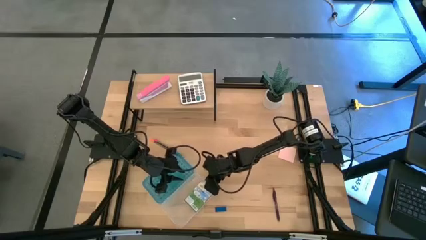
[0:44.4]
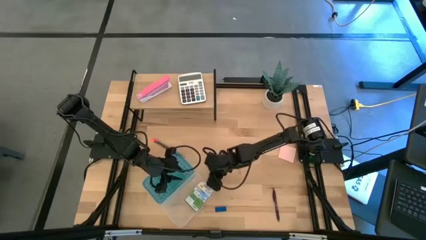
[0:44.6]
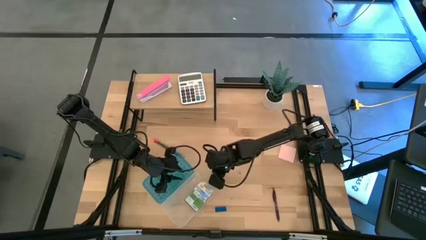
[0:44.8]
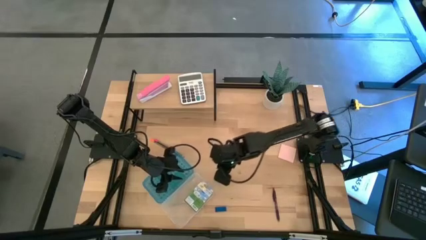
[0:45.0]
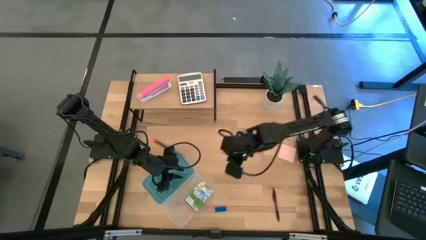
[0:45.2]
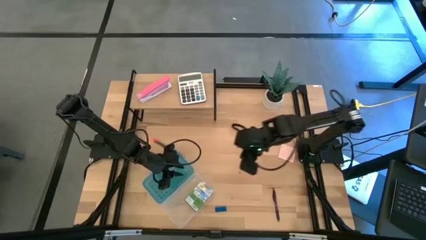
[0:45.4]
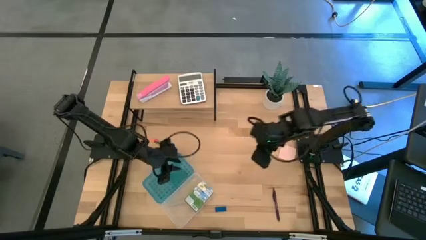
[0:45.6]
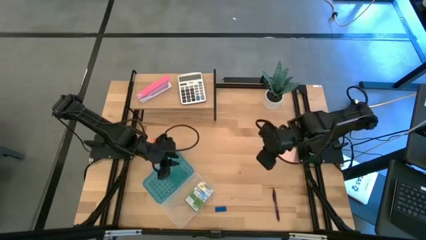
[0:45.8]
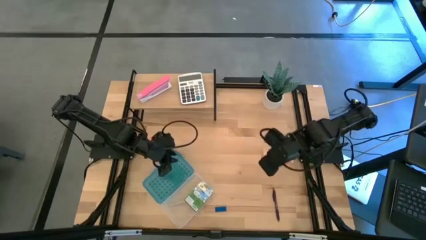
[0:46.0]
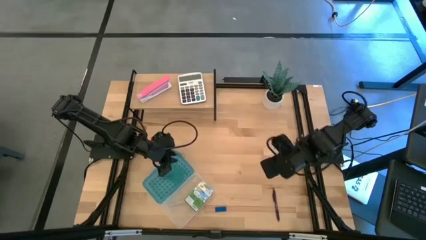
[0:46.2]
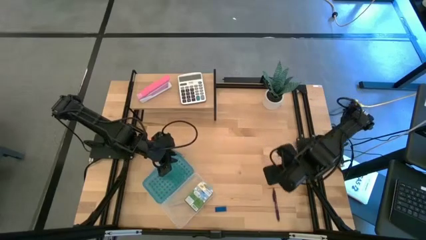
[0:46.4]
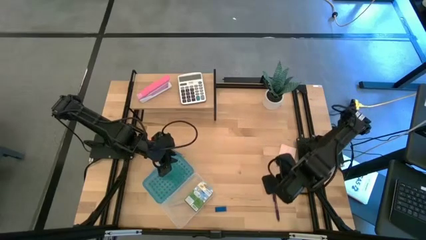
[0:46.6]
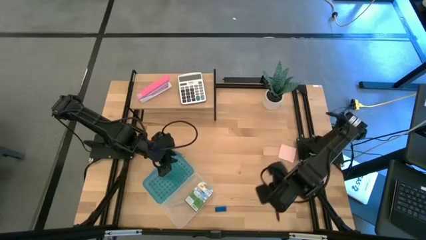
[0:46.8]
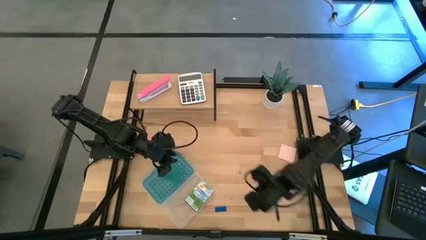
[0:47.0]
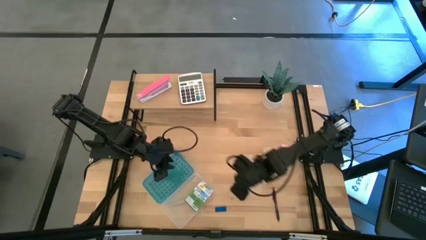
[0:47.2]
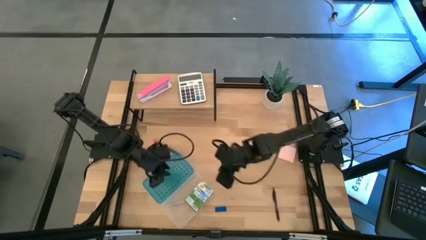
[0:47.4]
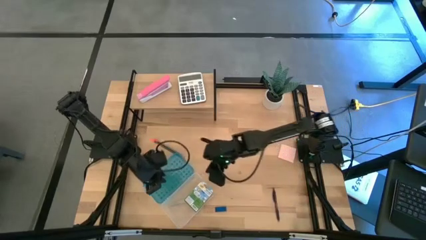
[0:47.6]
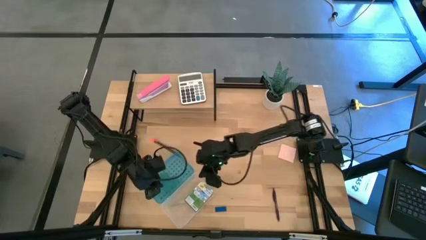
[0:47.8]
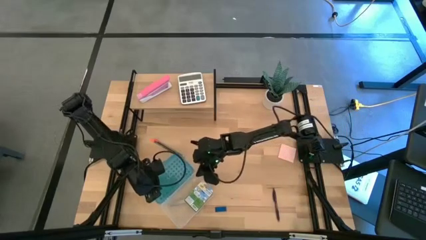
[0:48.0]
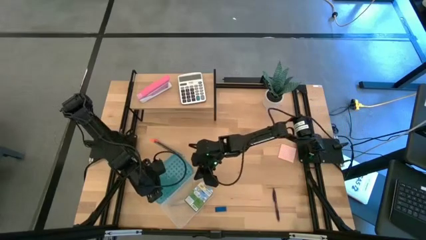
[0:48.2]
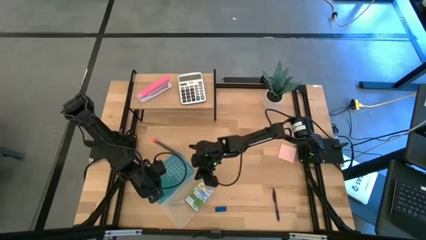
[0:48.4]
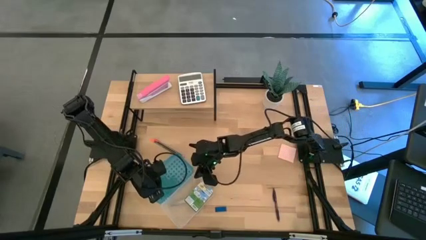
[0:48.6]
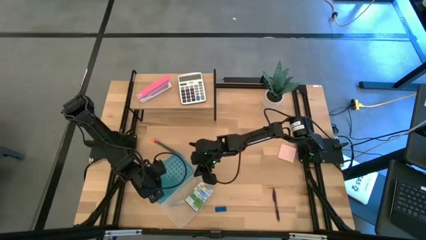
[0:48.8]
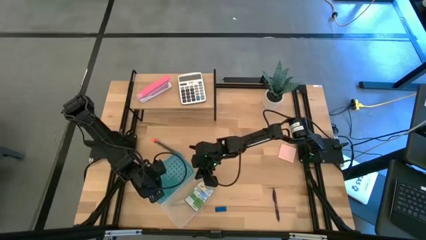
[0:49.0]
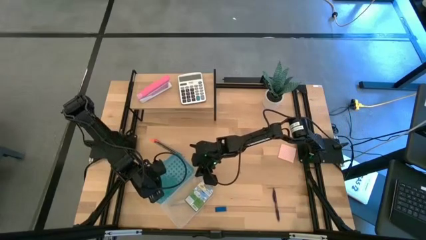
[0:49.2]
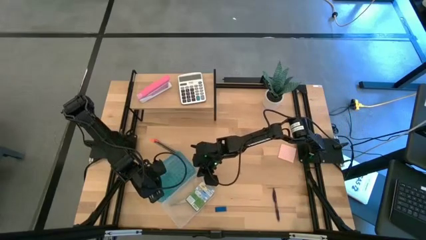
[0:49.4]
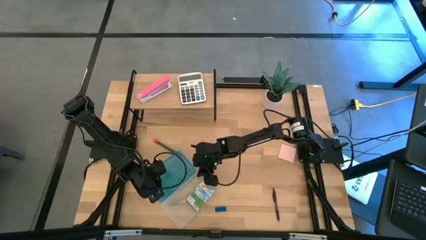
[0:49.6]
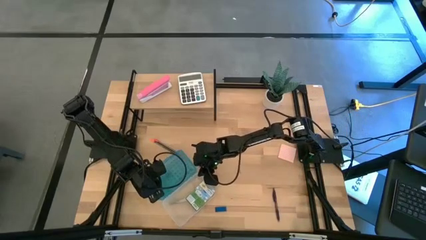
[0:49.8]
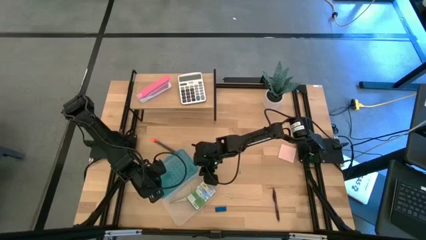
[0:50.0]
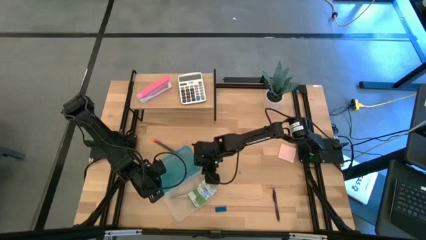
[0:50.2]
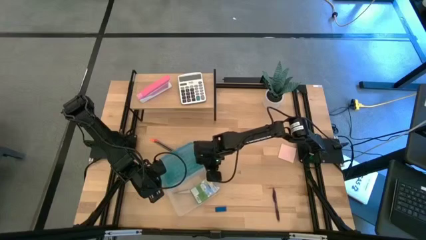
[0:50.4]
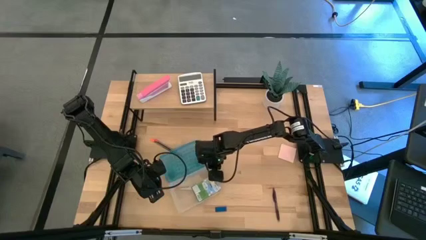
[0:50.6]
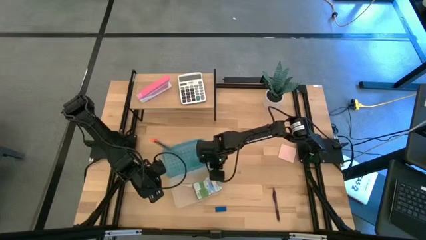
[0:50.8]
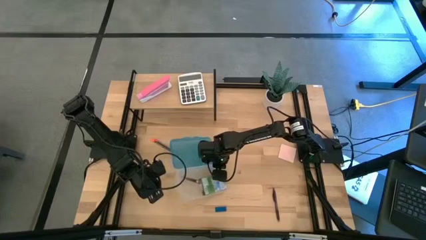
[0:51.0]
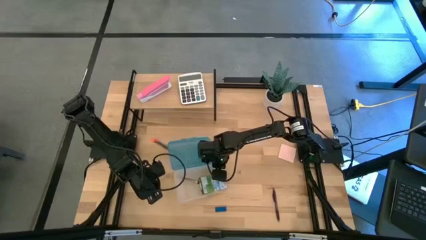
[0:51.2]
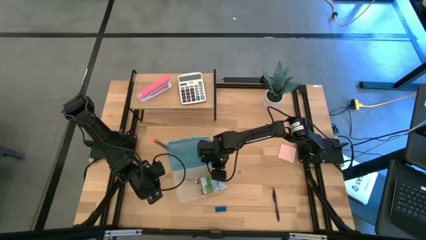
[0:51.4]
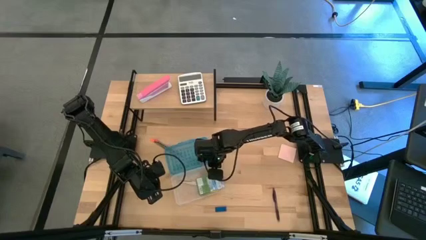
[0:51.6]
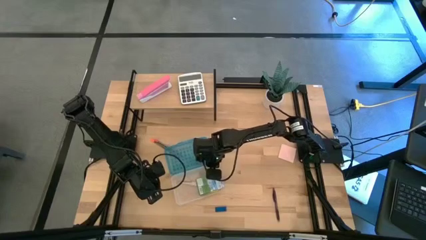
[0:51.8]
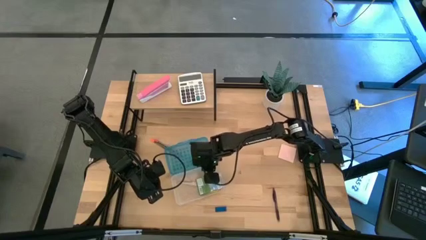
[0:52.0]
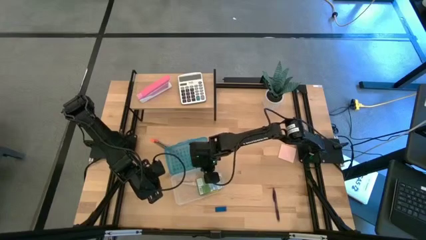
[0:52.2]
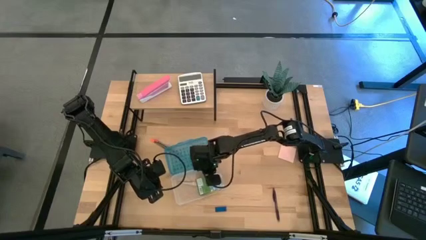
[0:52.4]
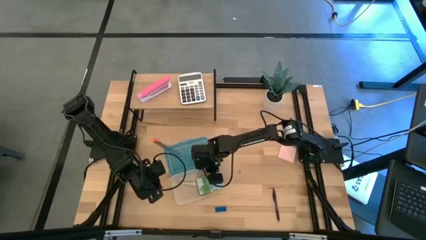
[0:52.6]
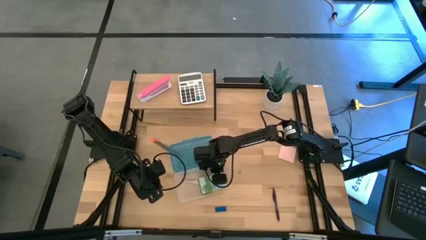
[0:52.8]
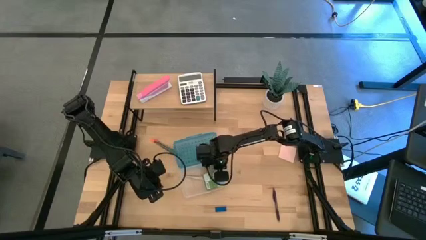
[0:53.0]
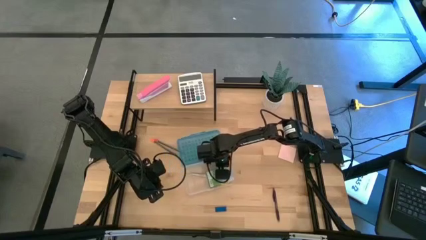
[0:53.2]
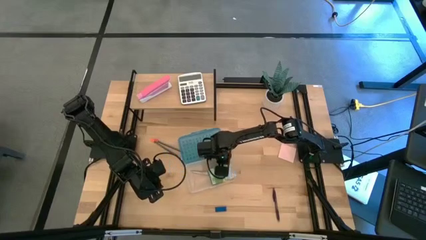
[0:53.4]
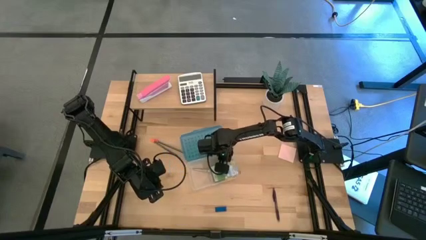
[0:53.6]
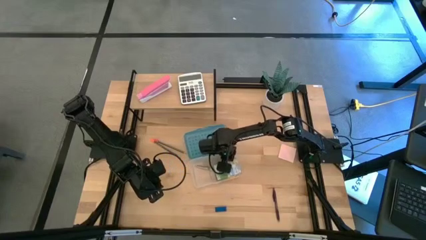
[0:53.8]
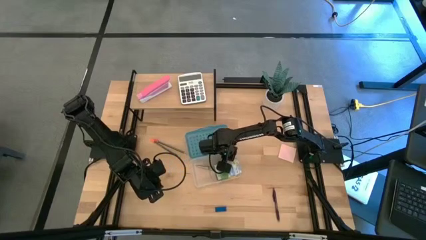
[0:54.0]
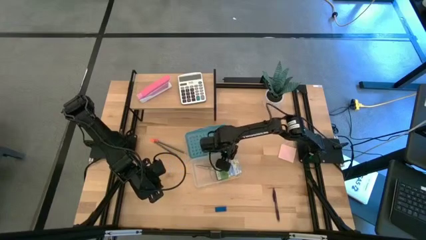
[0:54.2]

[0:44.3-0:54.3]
Task: Pack school essentials
Move the blue supply box to the center of the table
